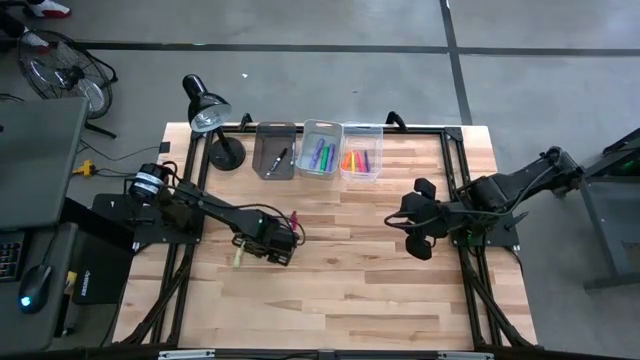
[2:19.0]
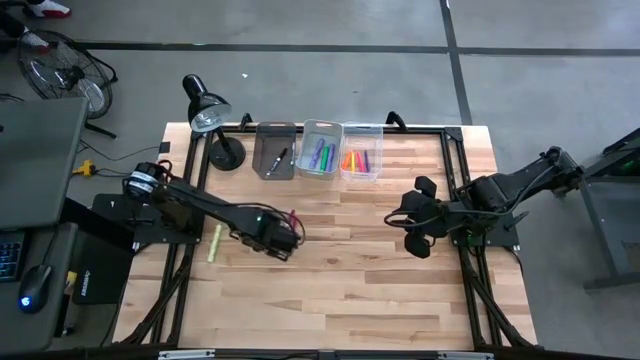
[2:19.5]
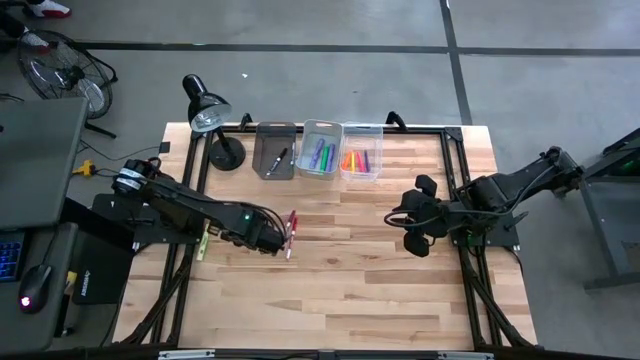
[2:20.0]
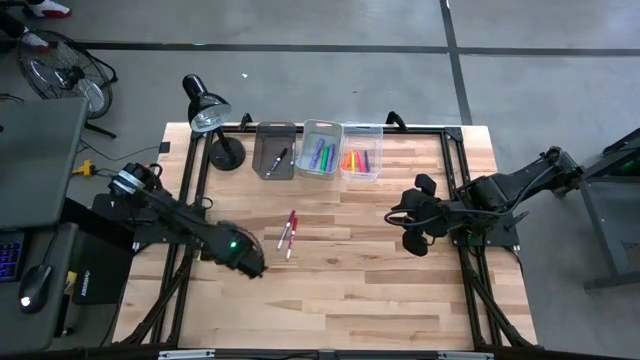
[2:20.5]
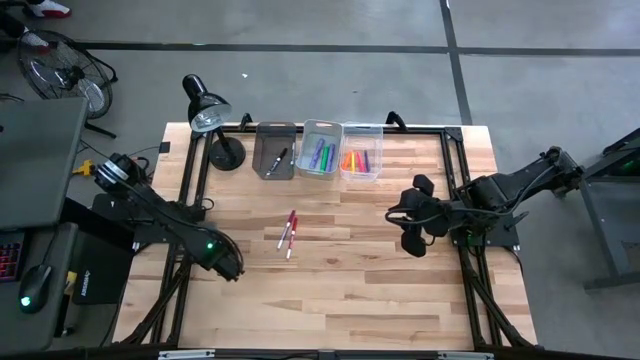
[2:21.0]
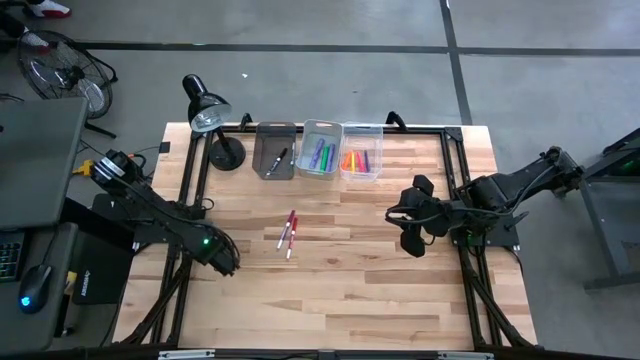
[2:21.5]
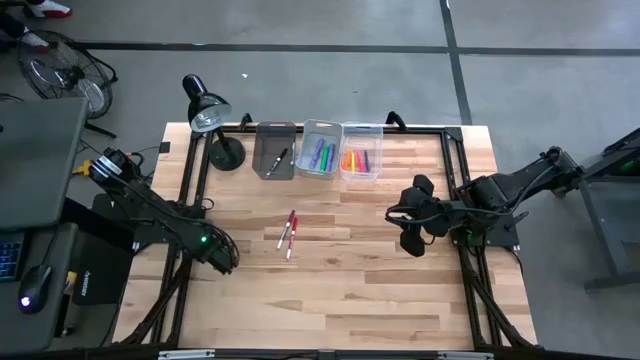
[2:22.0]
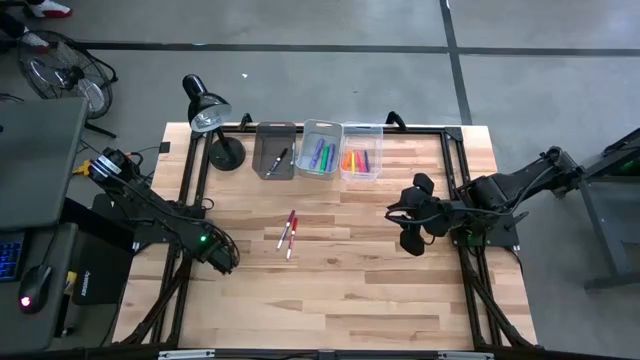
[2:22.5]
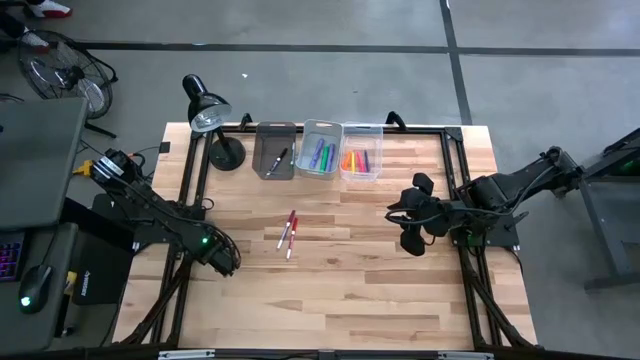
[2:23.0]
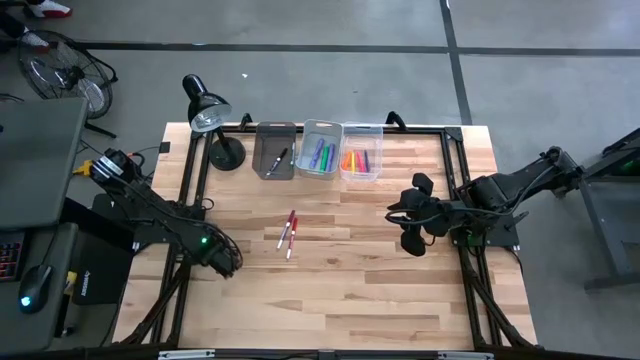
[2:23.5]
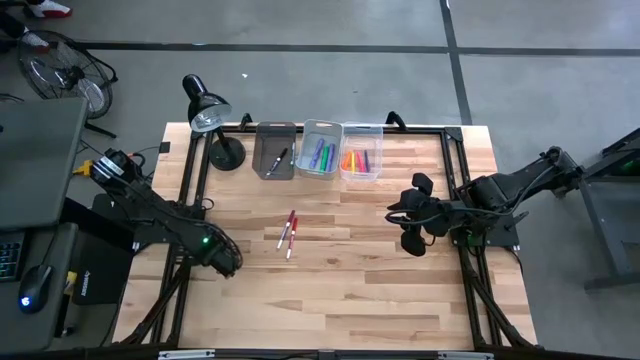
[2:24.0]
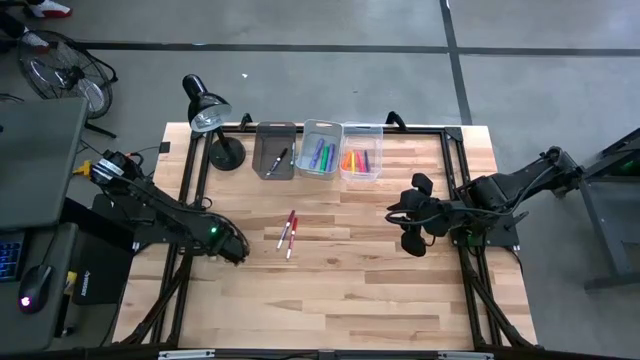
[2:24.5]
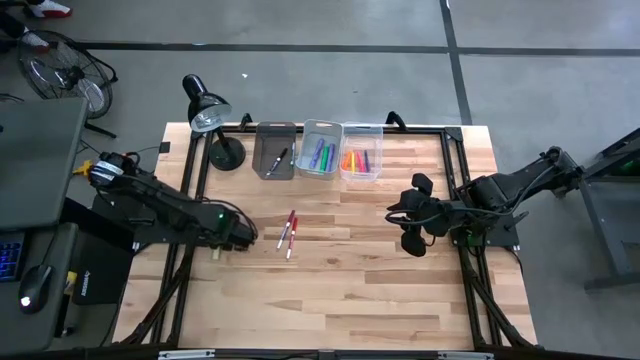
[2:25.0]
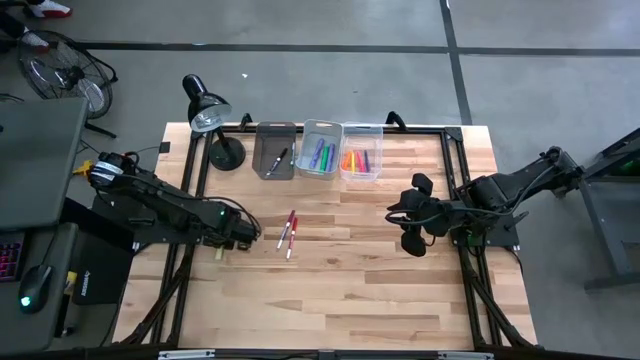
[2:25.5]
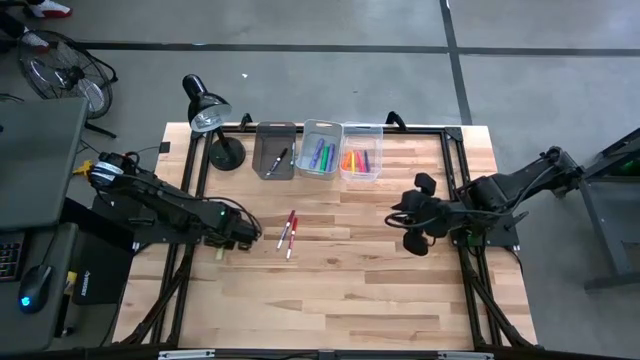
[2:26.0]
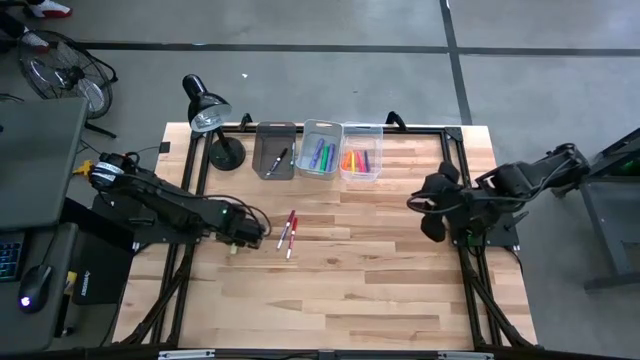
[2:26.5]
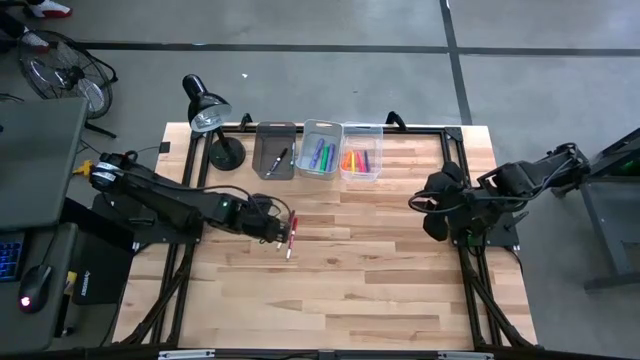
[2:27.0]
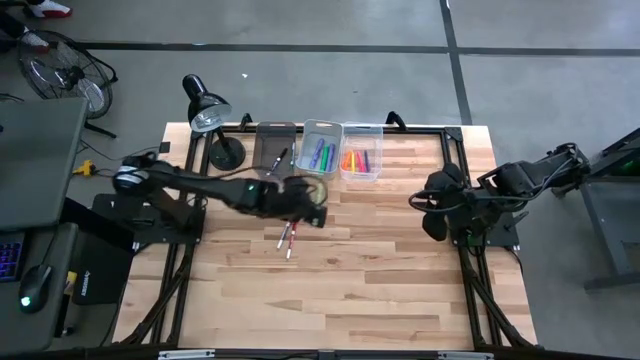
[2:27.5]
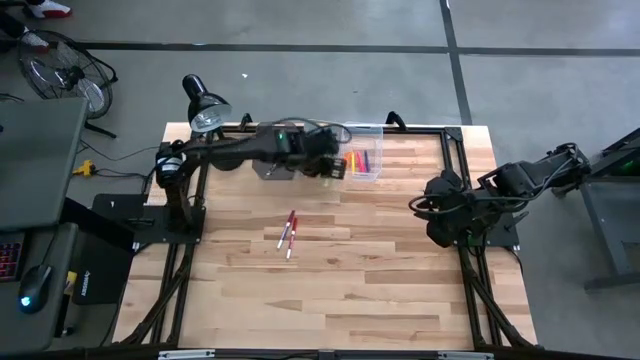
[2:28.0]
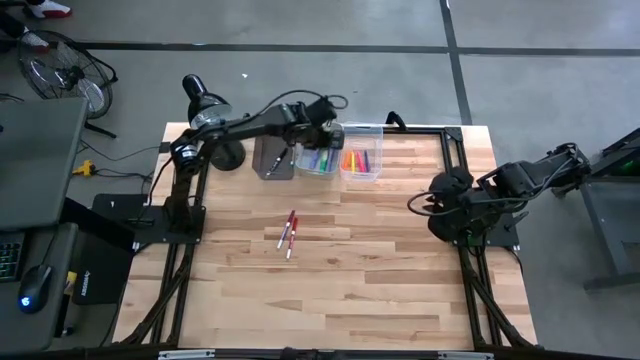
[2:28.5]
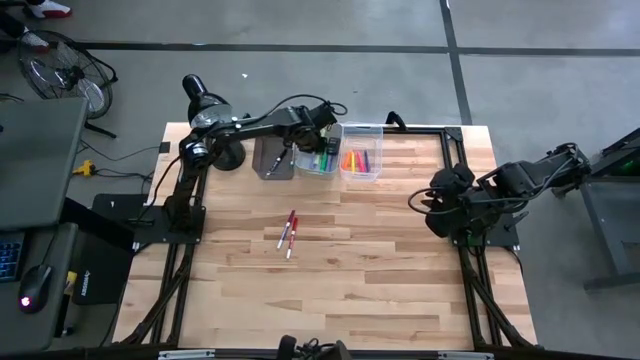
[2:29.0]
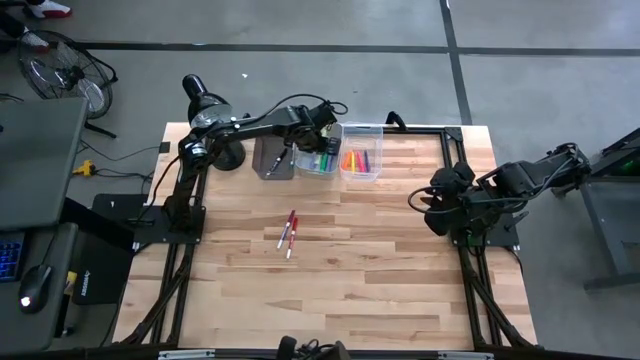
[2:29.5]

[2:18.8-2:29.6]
Task: Pick & Place Markers
Put the light green highlighter into the white bin

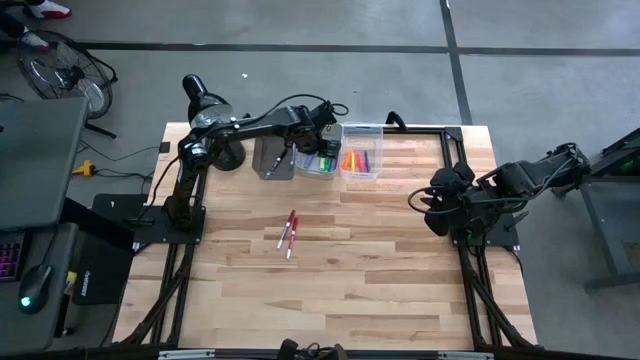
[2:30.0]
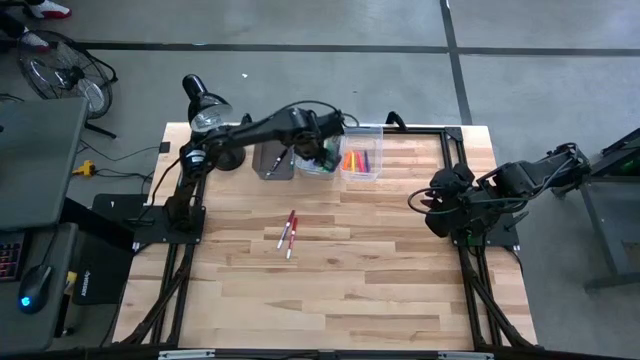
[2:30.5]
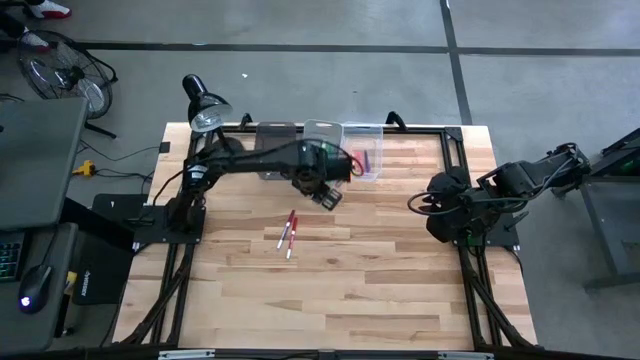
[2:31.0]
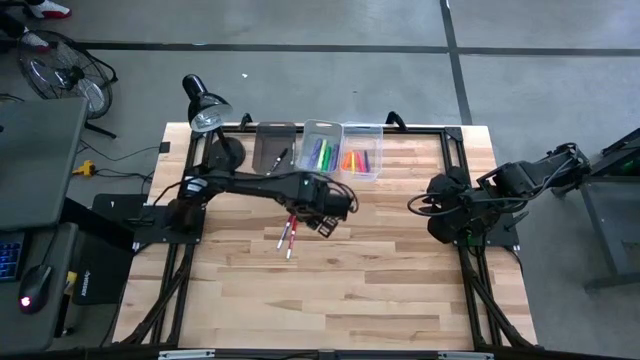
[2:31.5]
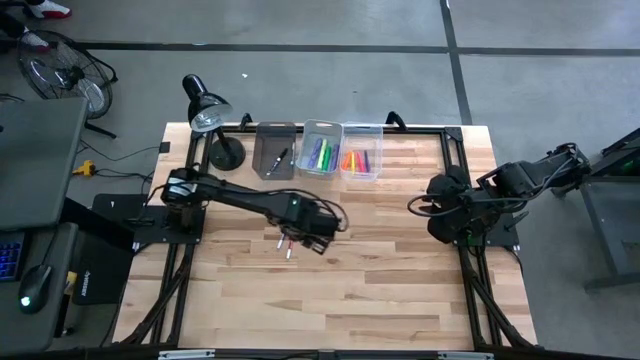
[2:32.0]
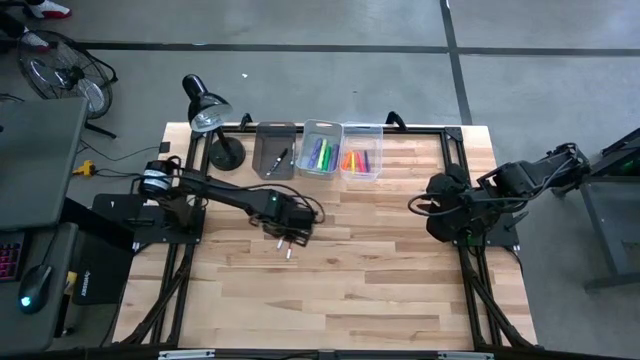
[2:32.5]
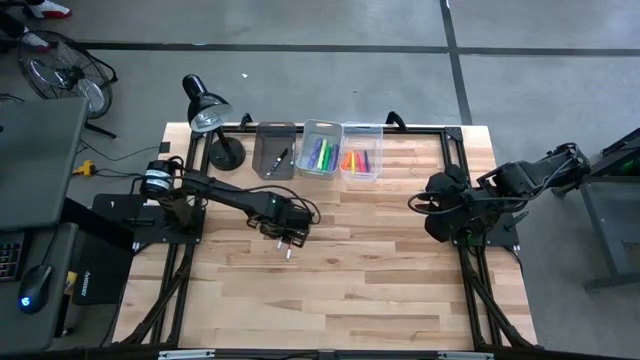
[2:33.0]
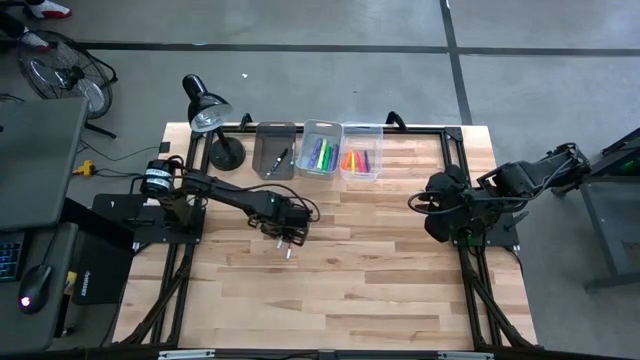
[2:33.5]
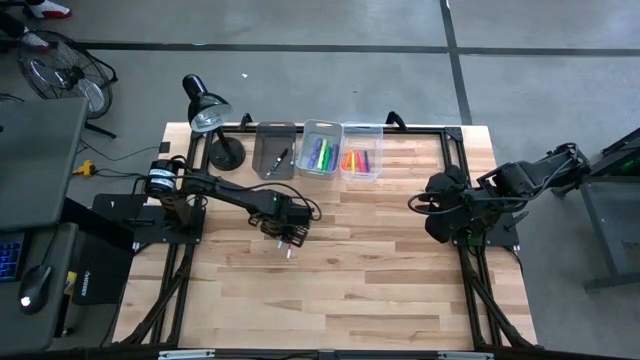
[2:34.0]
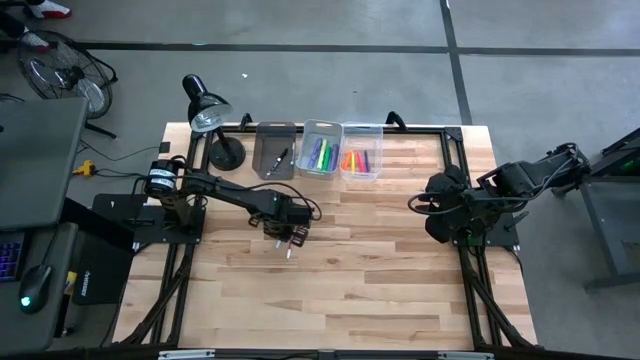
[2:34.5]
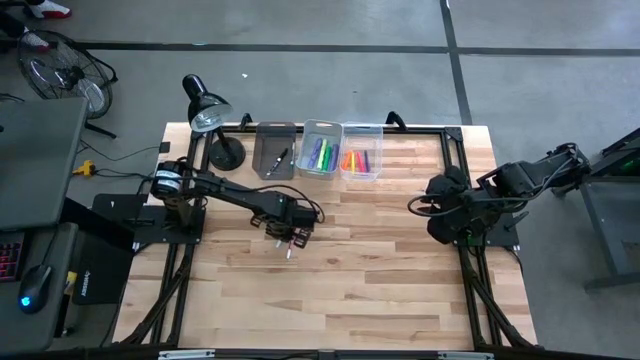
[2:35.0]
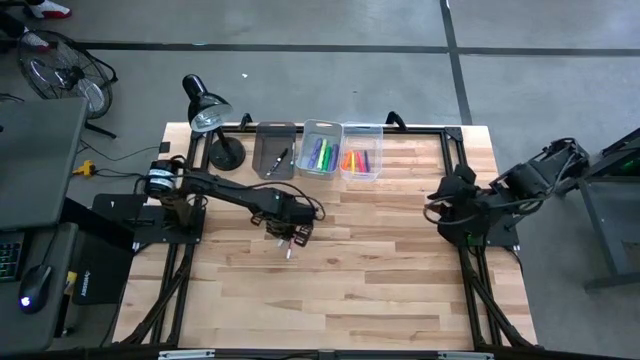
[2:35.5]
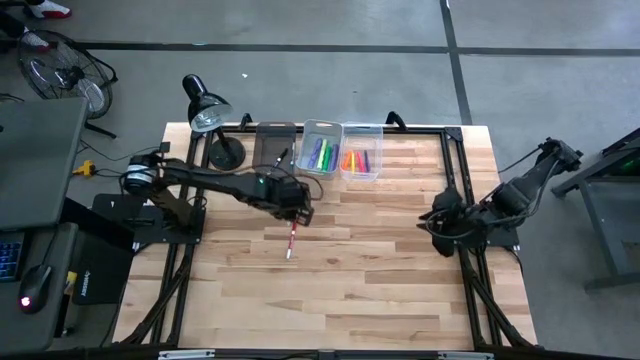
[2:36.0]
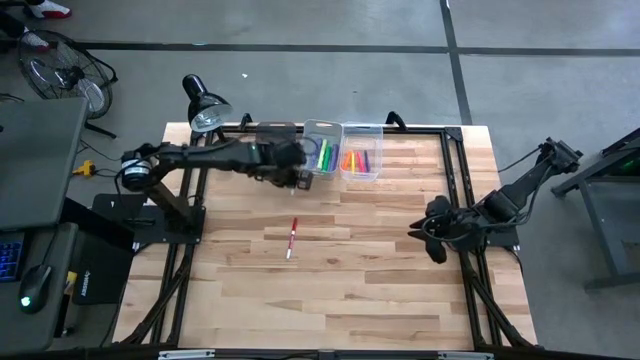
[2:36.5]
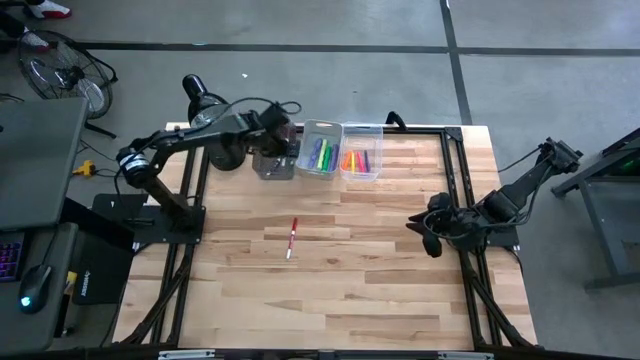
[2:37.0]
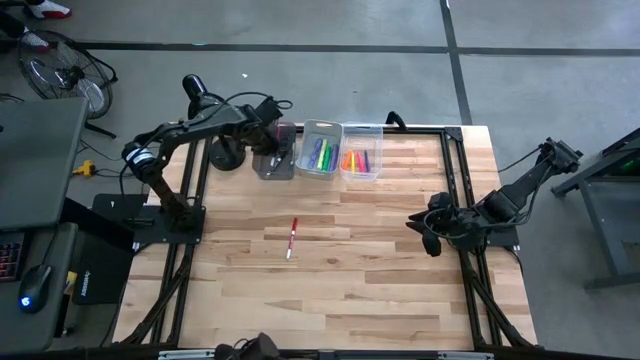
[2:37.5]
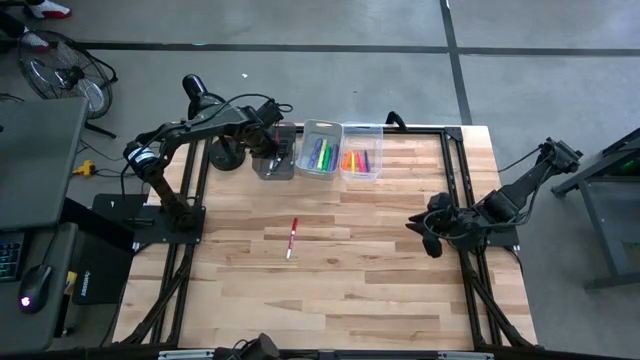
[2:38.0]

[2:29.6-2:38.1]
Put the dark pink marker into the black bin

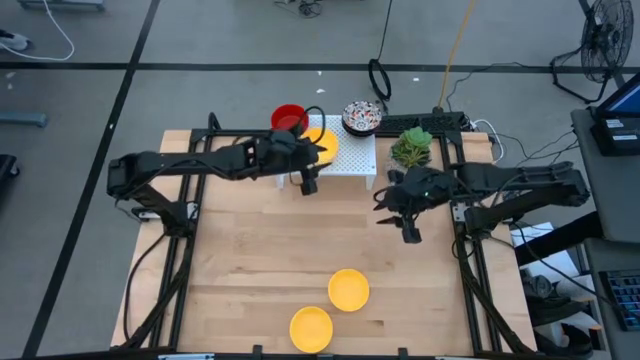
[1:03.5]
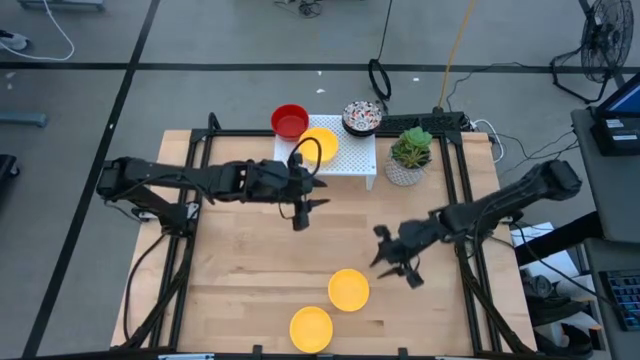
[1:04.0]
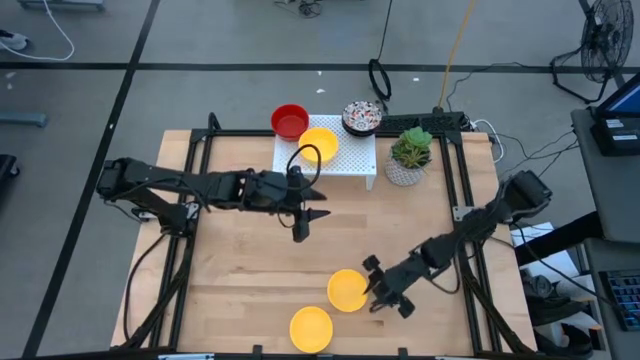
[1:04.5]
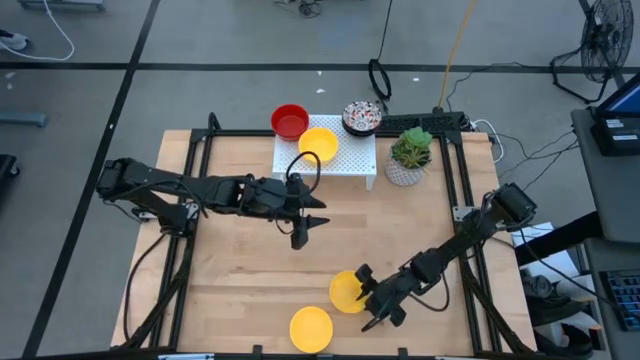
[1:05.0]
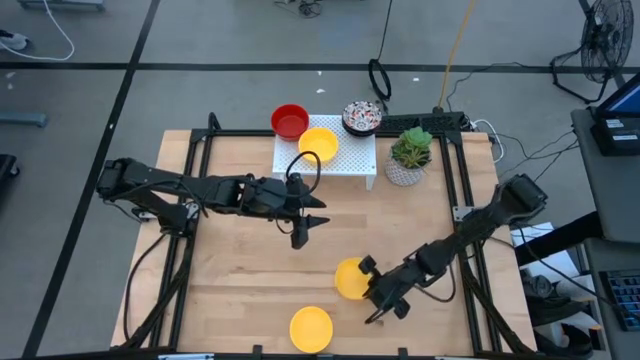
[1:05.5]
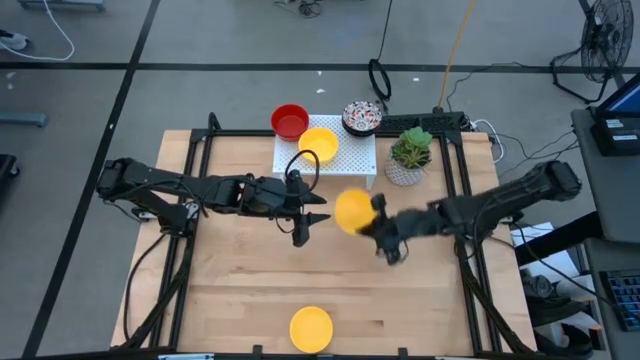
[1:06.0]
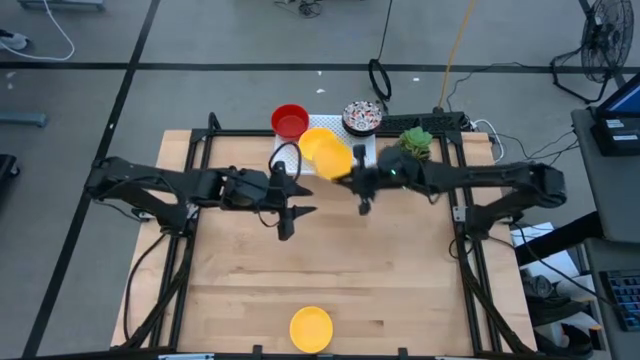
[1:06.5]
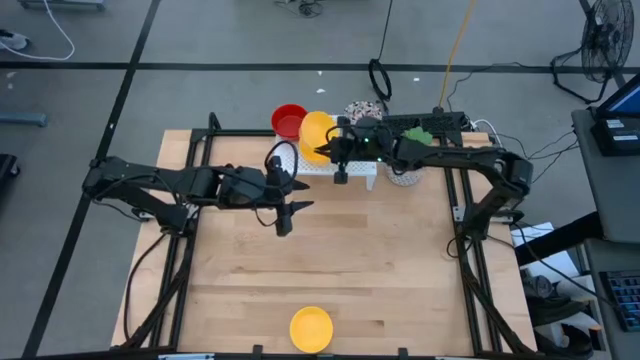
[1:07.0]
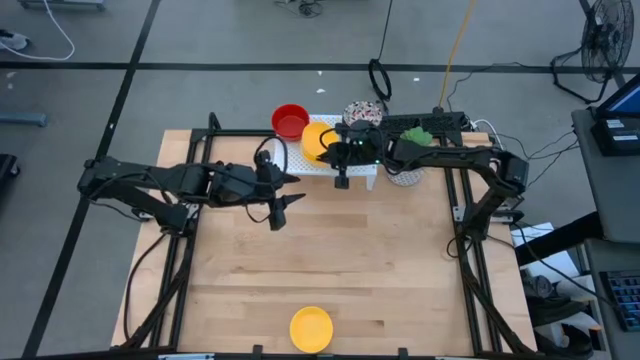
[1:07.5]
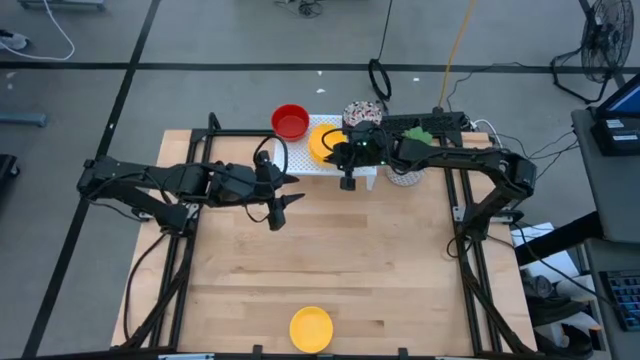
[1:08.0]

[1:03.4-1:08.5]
Task: Pick & Place Mini bowls
Stack the yellow bowl on the other yellow bowls on the shelf
